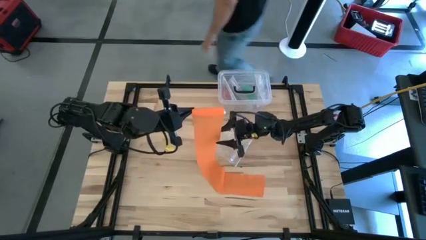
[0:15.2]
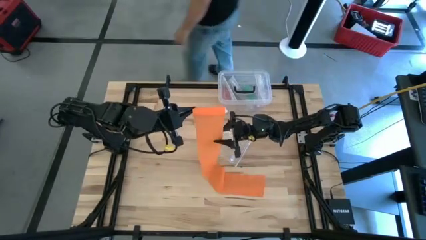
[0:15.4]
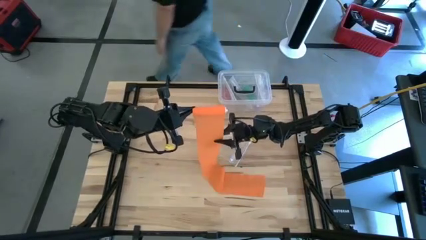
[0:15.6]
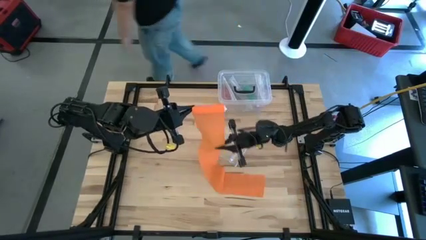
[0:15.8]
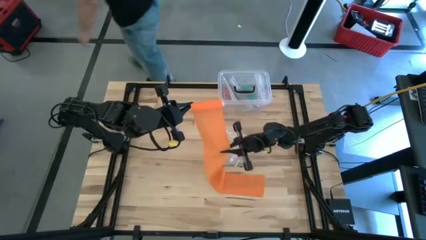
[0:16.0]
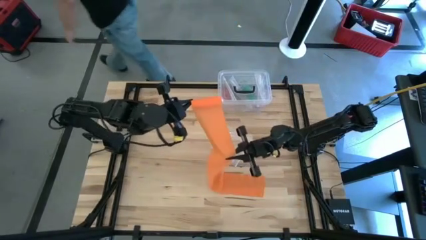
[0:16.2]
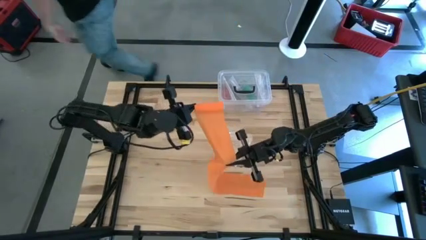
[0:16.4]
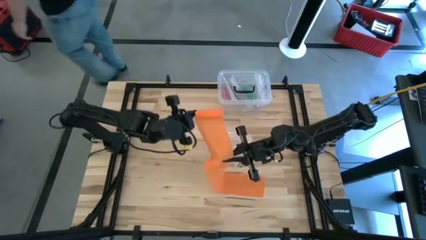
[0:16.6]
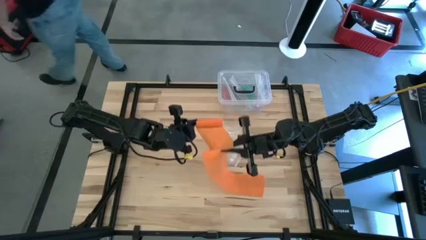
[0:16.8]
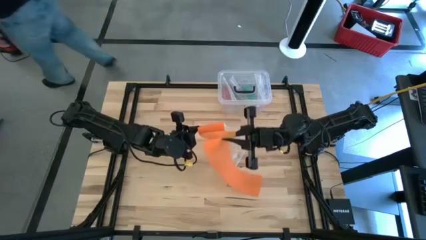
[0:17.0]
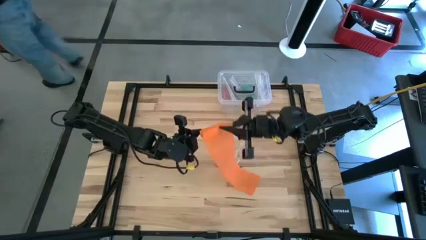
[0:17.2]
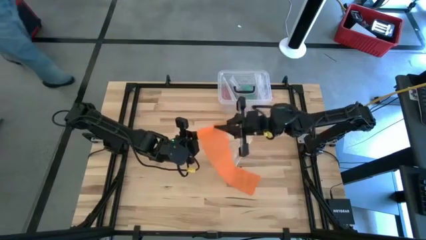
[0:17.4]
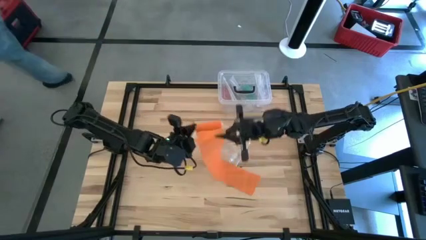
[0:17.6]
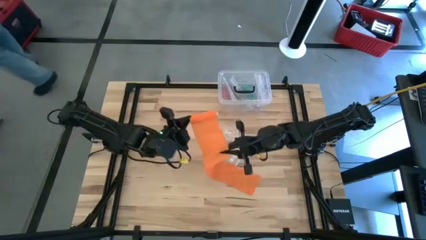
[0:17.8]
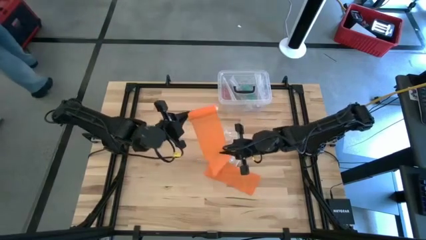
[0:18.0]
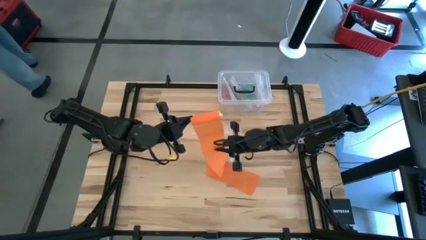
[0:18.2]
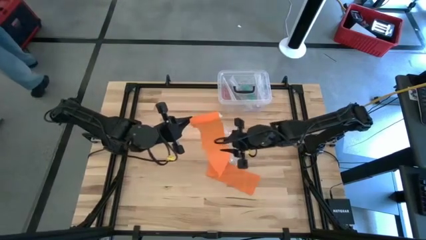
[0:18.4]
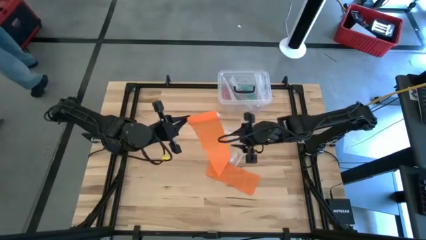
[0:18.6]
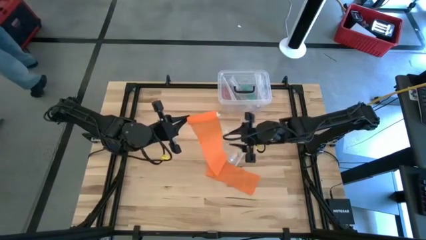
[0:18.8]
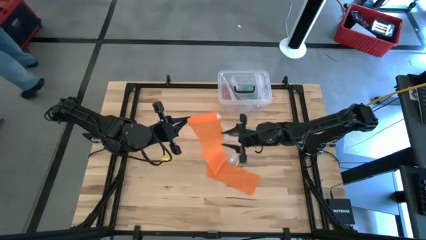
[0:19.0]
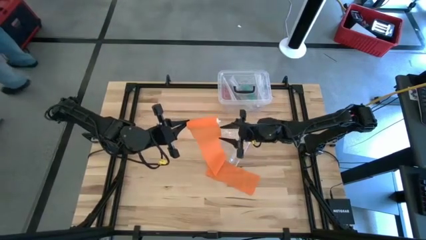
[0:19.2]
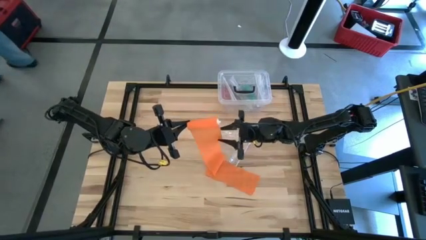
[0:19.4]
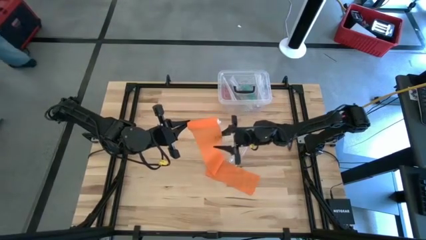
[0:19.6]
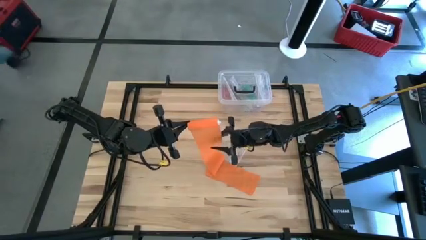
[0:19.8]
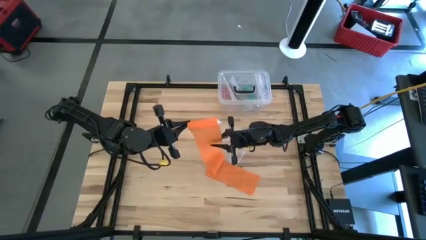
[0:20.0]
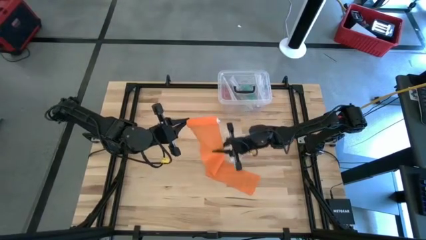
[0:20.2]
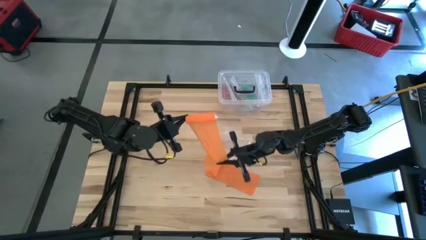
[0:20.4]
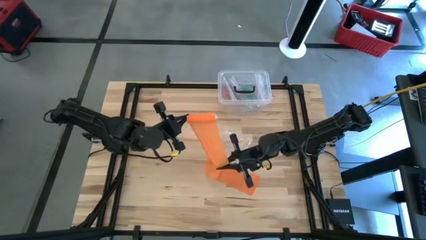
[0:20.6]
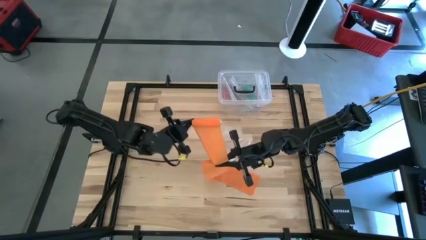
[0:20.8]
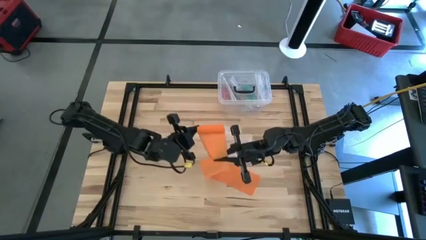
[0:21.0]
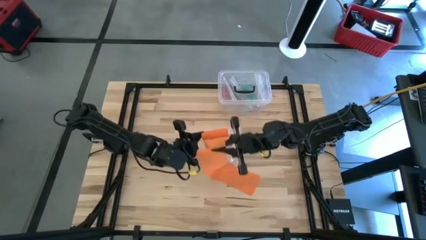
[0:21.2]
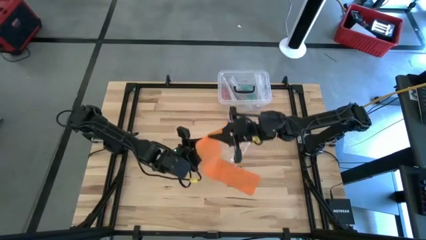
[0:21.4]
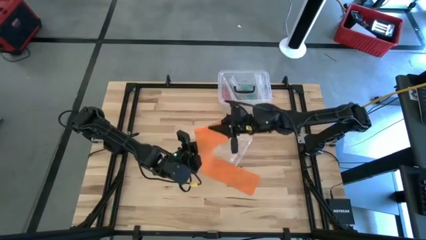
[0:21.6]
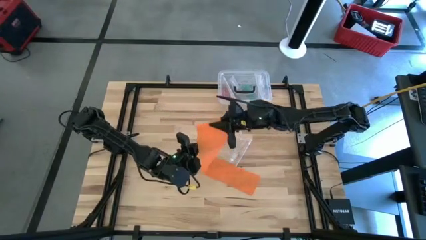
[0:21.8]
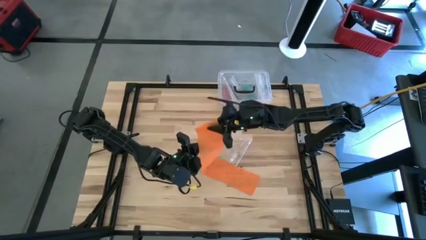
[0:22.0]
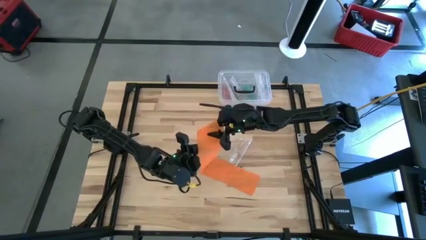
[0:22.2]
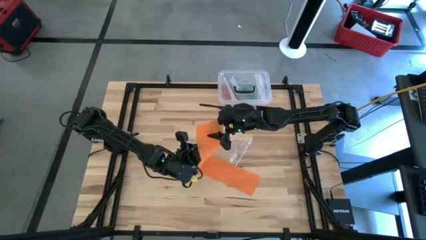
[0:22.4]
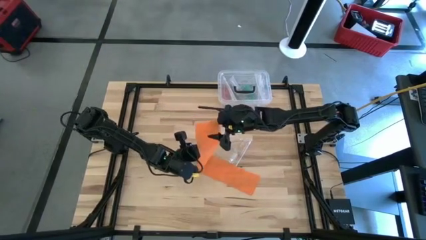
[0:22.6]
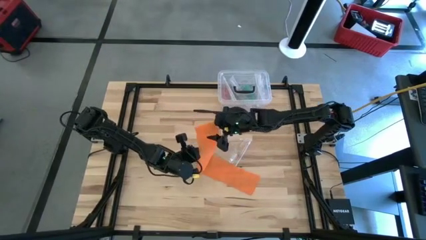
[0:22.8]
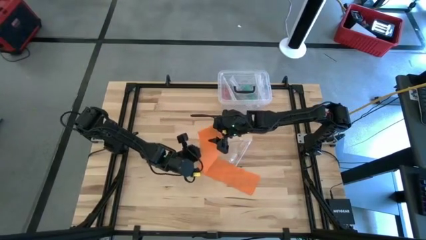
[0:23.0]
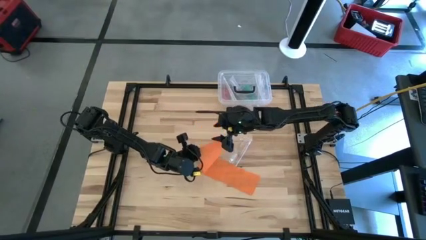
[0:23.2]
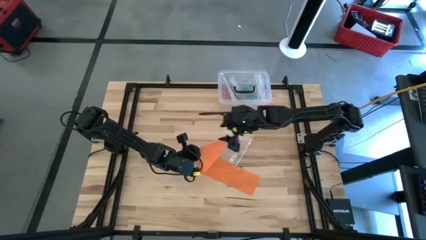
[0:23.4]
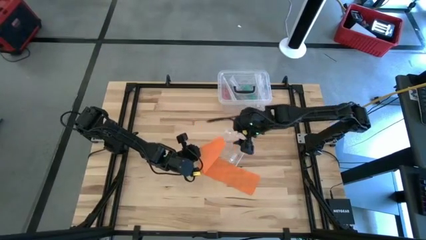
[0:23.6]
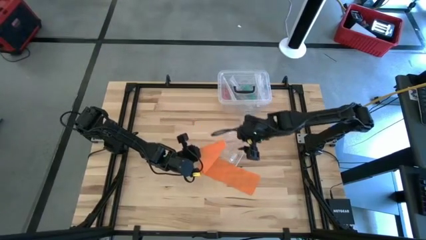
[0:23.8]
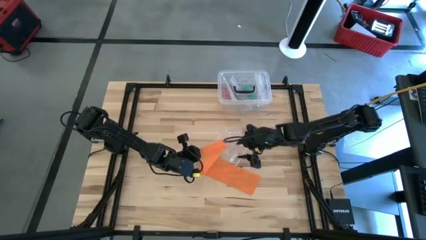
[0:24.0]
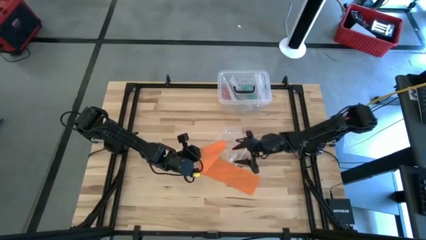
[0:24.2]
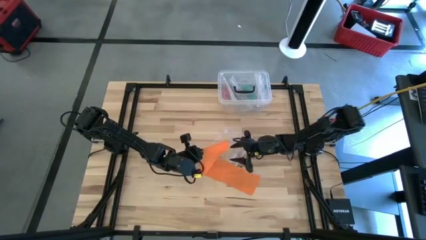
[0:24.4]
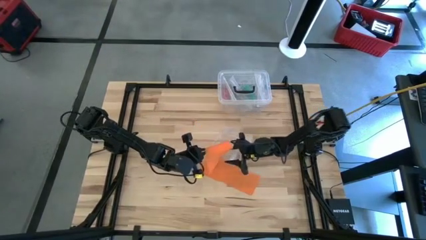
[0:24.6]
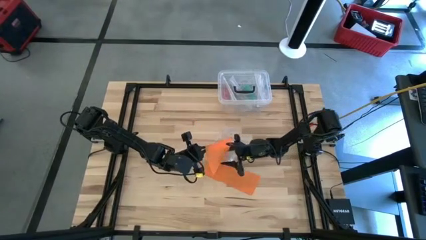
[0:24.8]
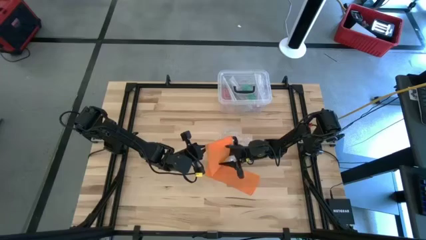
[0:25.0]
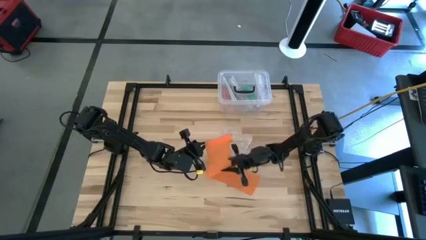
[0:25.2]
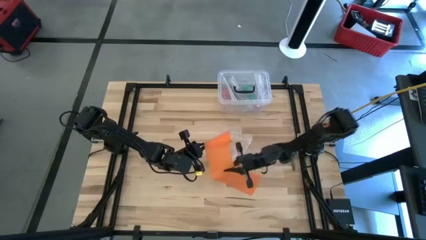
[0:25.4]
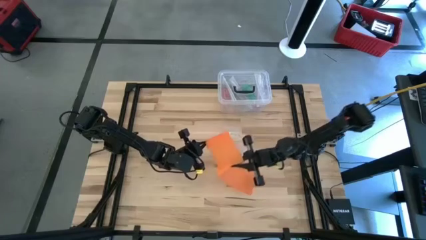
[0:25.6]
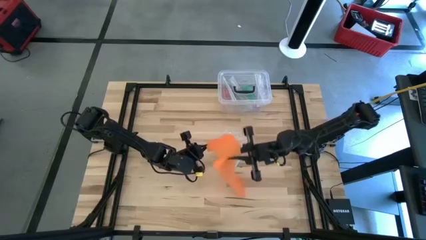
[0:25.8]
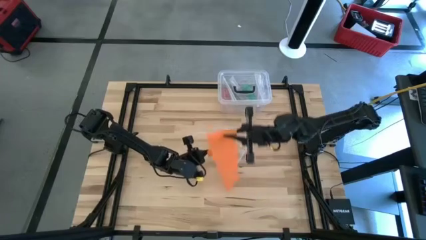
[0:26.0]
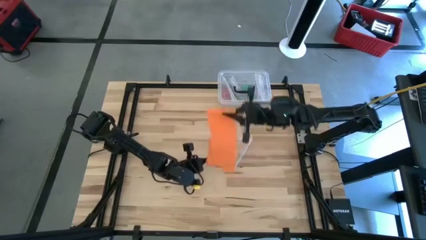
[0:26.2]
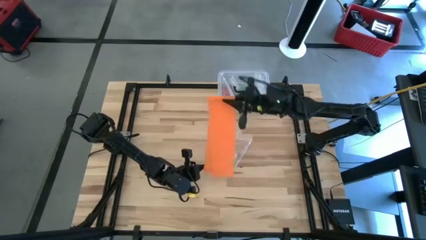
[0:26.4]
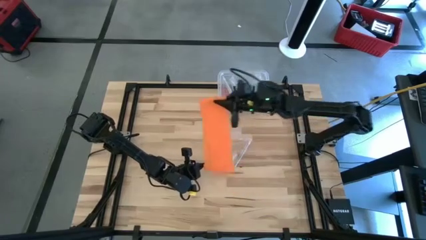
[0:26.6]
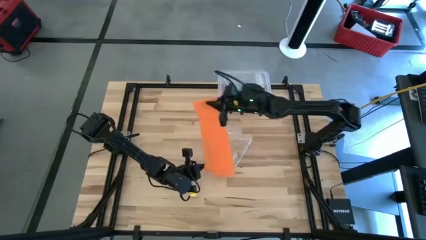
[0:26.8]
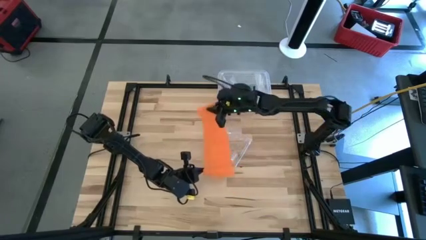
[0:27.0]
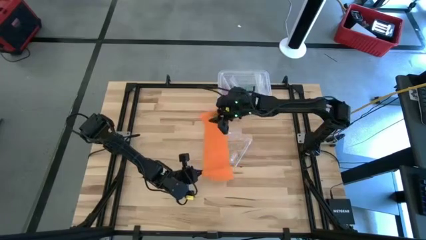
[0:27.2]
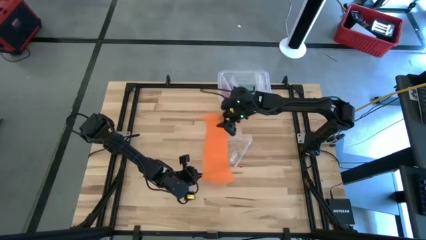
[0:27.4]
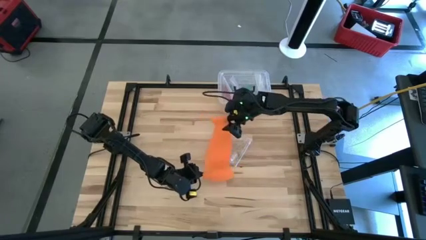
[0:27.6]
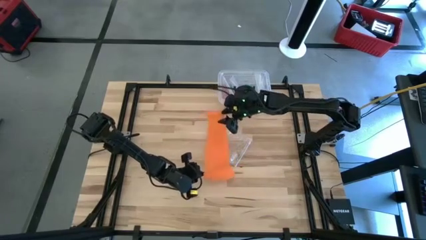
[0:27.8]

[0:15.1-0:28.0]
Task: Roll bandage
Roll the orange bandage

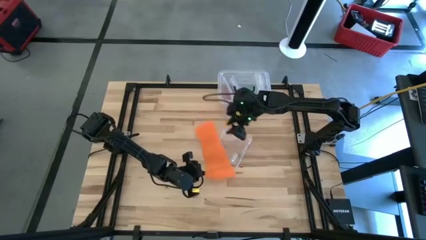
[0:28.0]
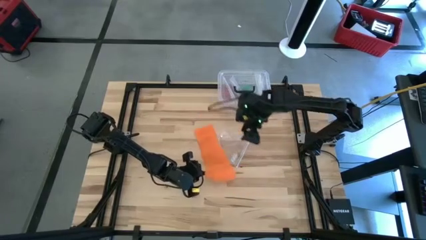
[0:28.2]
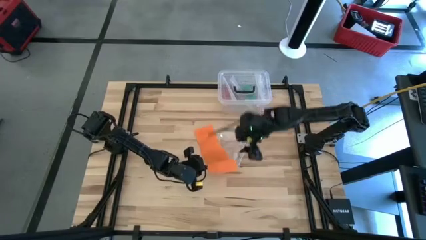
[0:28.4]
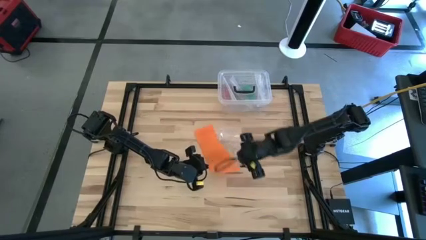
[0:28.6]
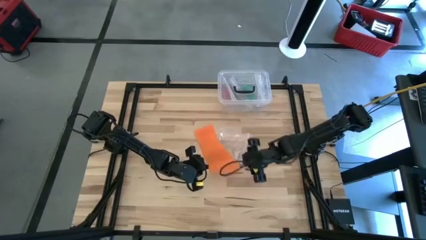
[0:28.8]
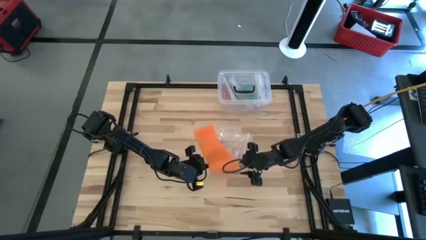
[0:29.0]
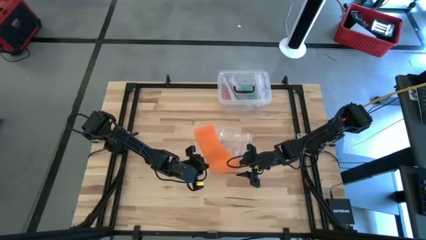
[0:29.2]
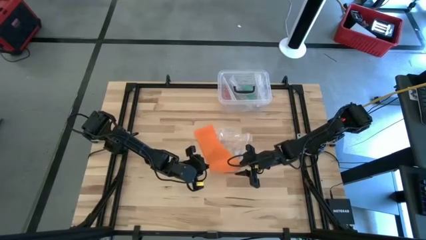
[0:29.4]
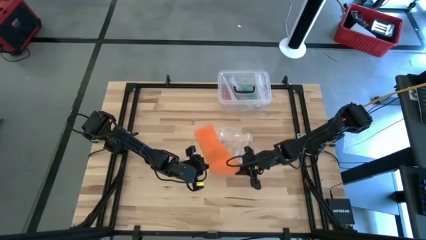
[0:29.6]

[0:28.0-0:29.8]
Roll the orange bandage

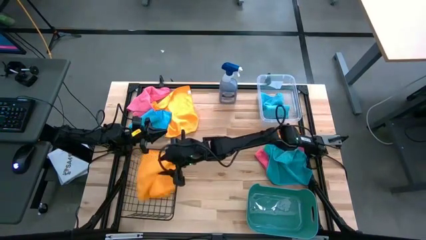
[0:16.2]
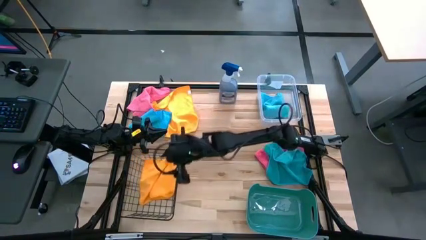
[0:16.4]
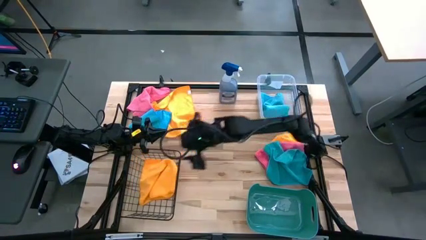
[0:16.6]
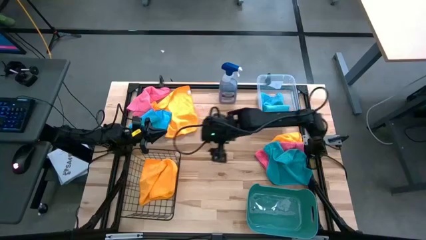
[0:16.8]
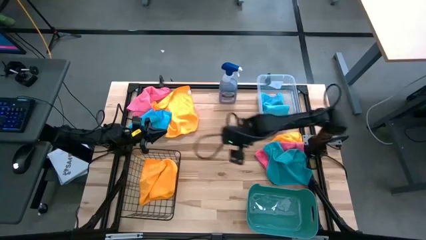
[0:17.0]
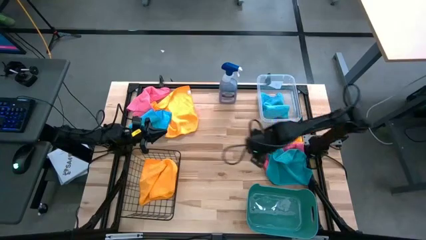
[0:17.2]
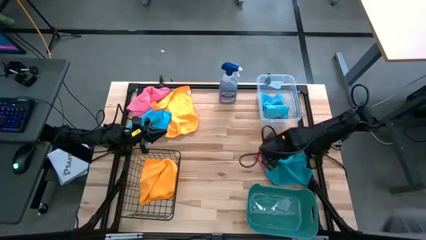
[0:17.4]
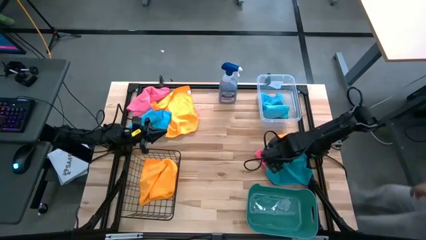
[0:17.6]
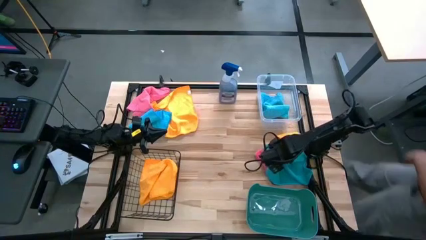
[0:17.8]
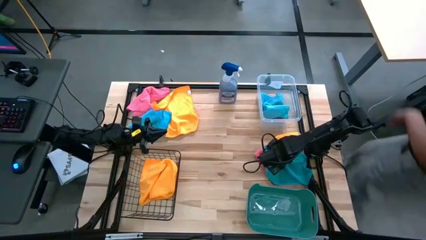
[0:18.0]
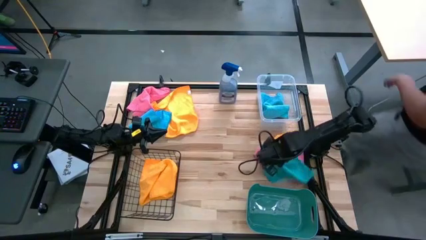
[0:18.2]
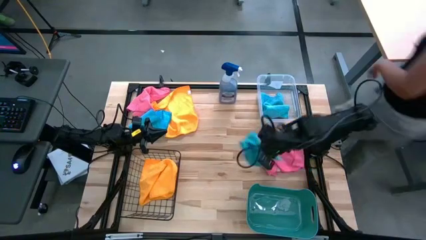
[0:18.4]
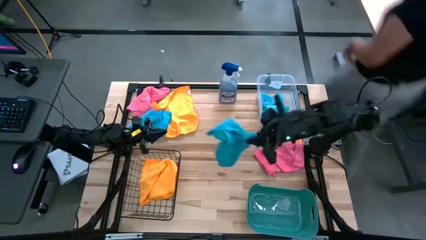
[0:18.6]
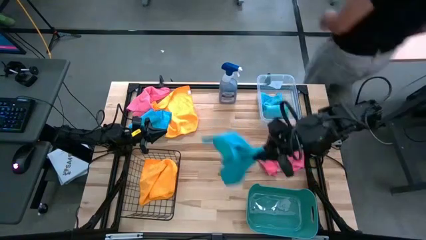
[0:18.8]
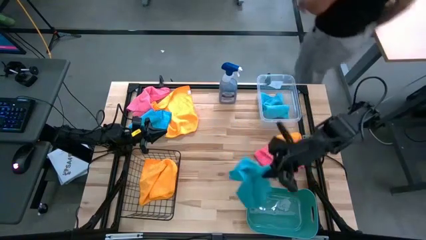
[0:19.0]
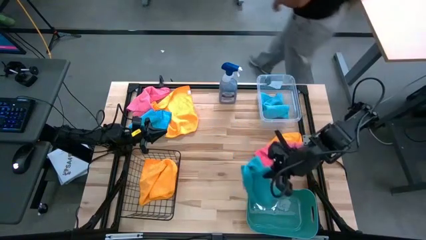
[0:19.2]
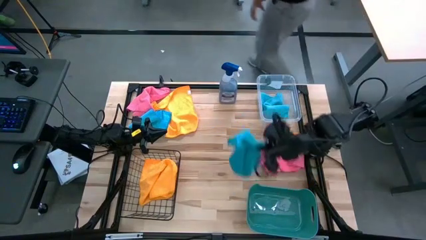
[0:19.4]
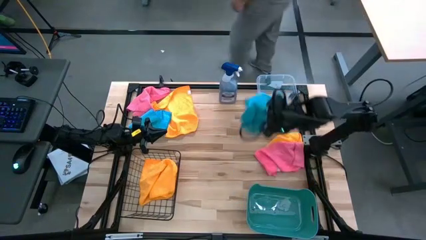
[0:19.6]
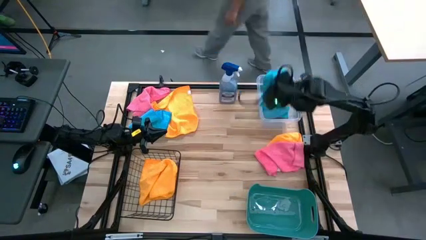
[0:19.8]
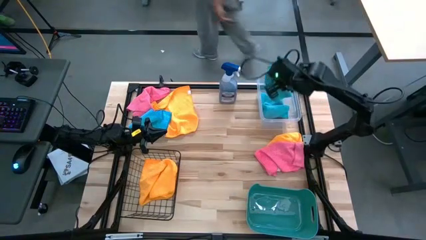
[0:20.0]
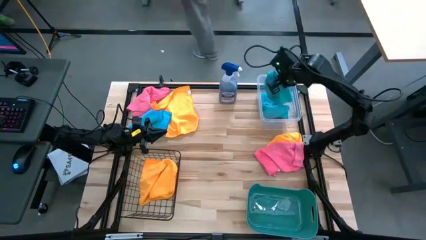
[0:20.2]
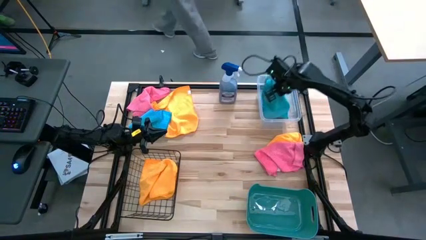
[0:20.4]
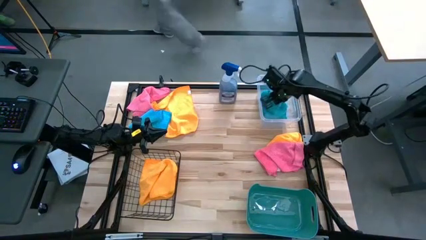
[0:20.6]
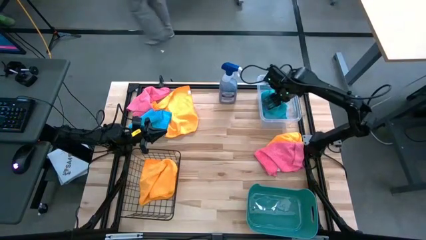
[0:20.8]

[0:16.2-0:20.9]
Task: Sort microfiber towel by color & place in baskets
Put the right blue microfiber towel into the transparent bin
